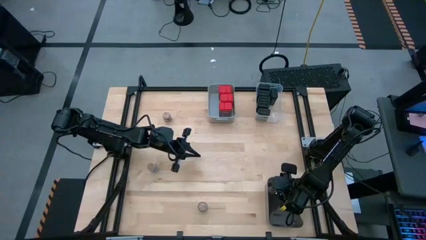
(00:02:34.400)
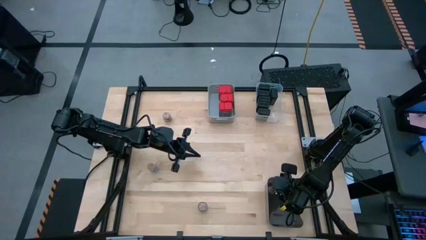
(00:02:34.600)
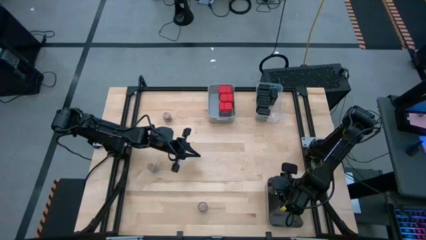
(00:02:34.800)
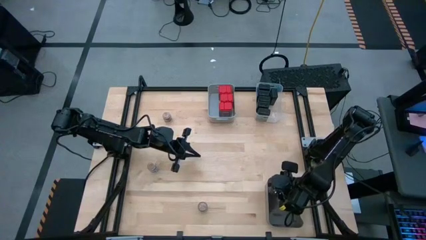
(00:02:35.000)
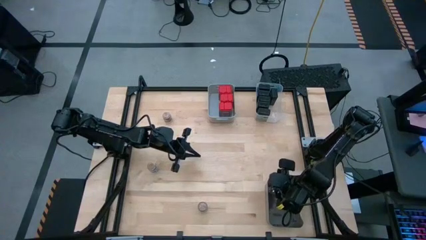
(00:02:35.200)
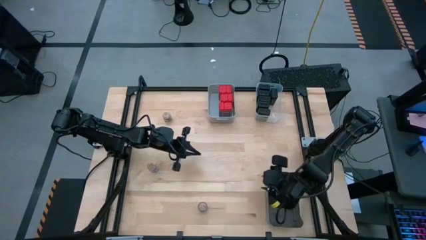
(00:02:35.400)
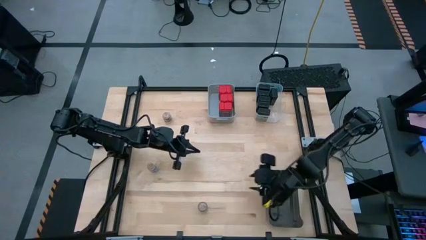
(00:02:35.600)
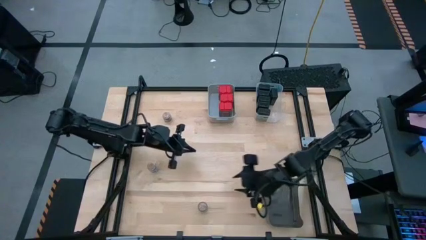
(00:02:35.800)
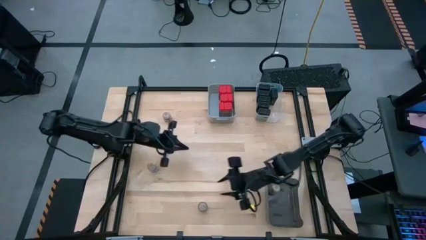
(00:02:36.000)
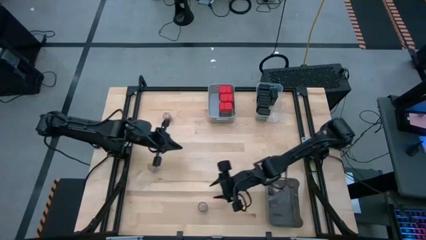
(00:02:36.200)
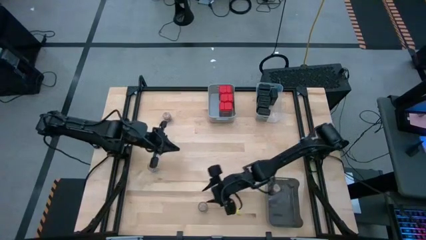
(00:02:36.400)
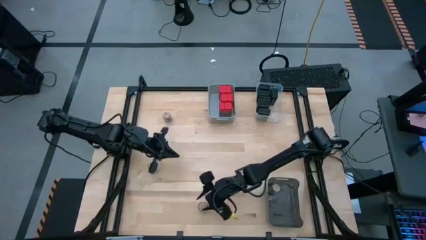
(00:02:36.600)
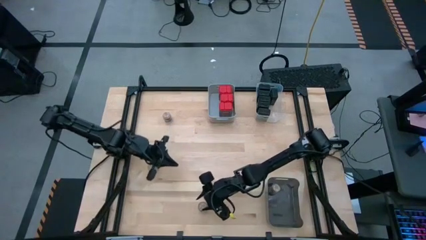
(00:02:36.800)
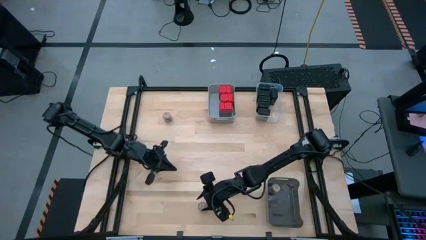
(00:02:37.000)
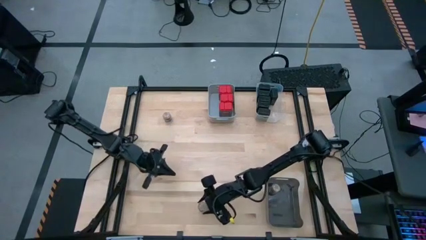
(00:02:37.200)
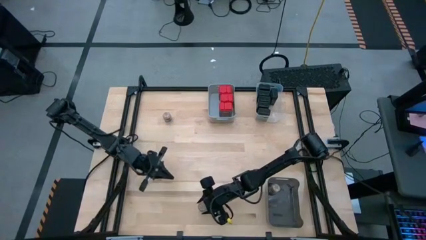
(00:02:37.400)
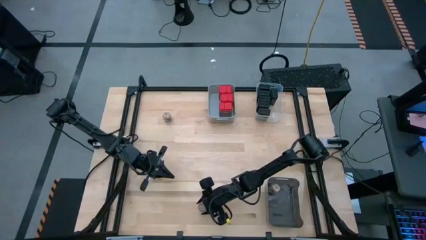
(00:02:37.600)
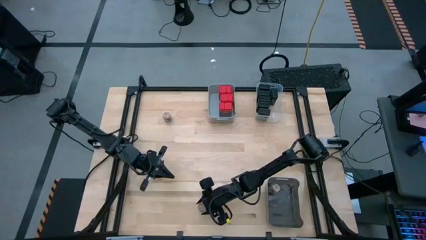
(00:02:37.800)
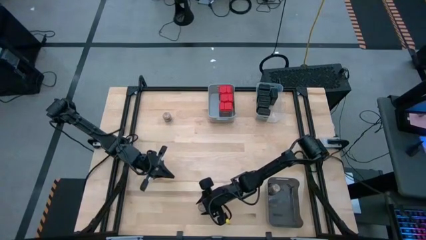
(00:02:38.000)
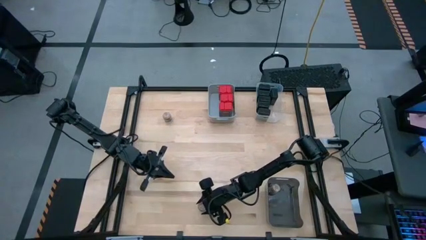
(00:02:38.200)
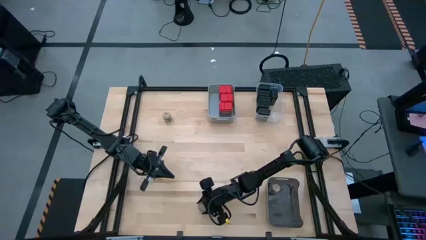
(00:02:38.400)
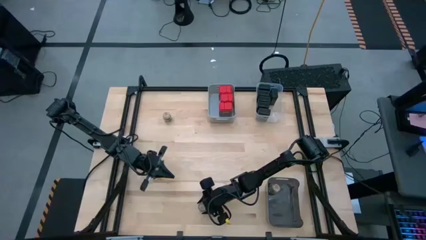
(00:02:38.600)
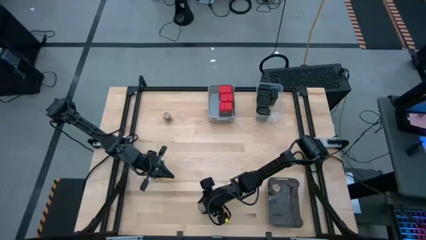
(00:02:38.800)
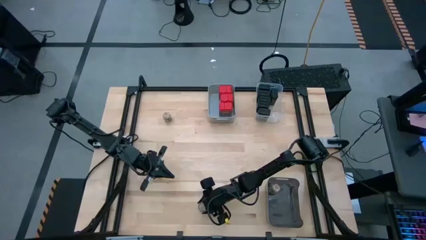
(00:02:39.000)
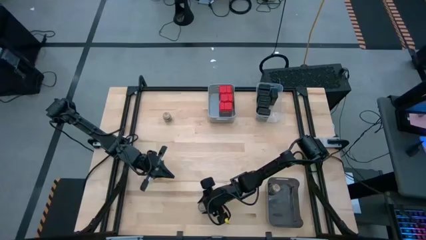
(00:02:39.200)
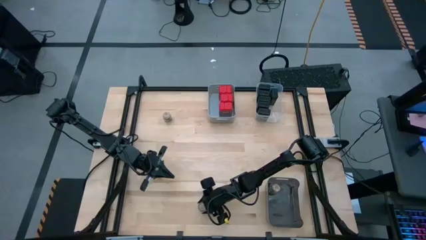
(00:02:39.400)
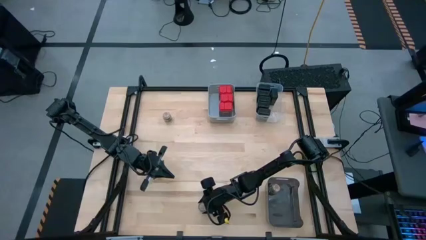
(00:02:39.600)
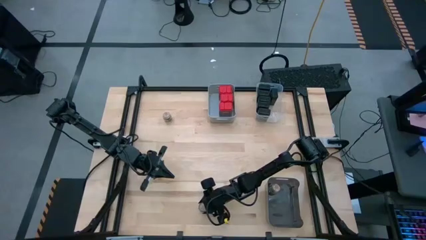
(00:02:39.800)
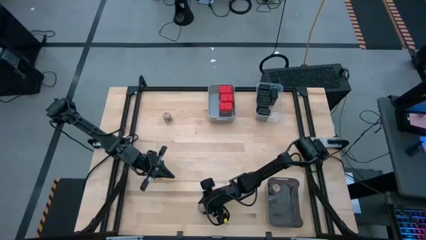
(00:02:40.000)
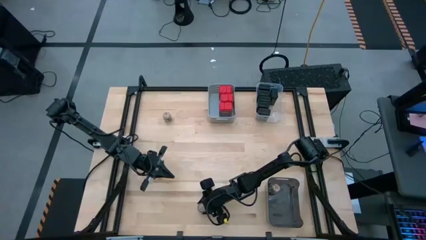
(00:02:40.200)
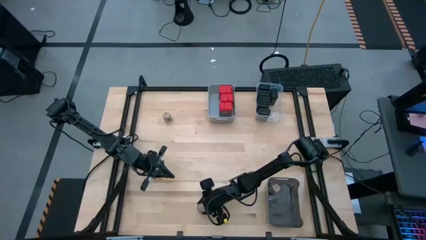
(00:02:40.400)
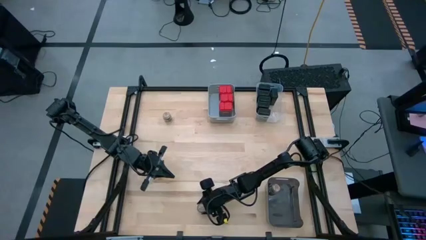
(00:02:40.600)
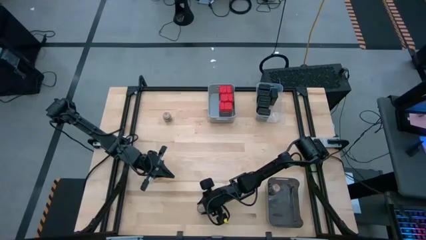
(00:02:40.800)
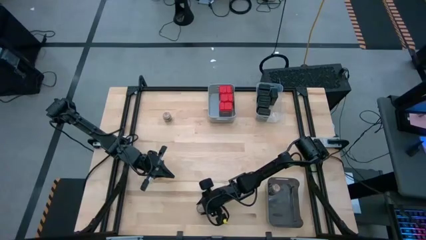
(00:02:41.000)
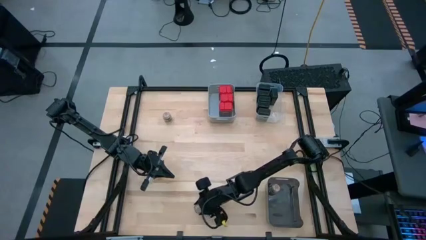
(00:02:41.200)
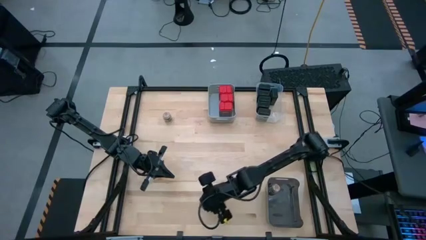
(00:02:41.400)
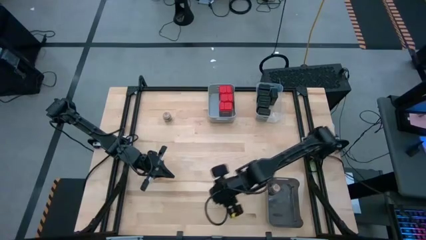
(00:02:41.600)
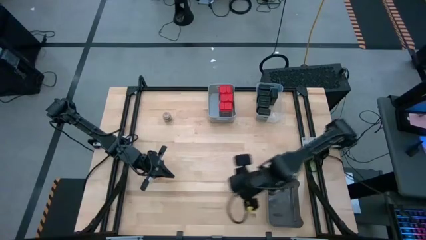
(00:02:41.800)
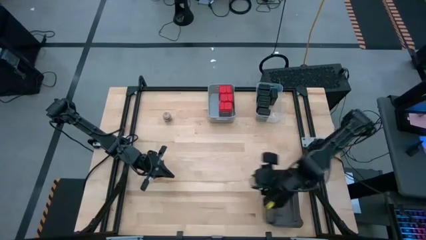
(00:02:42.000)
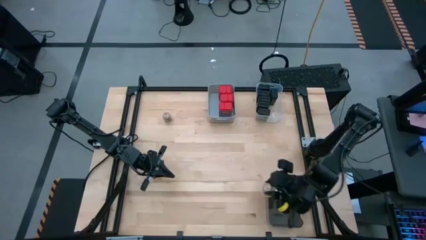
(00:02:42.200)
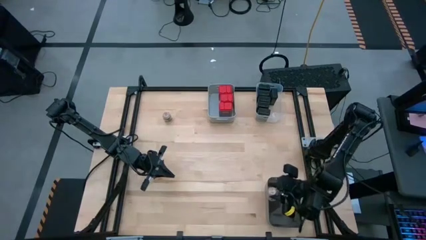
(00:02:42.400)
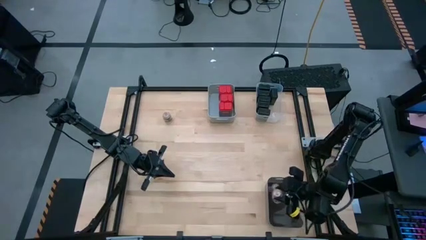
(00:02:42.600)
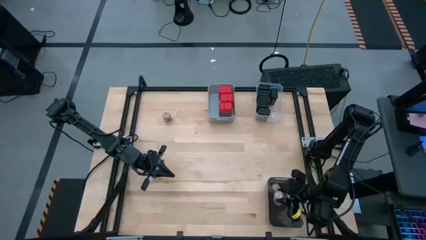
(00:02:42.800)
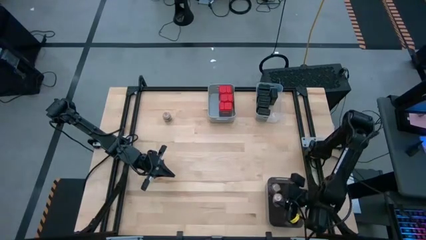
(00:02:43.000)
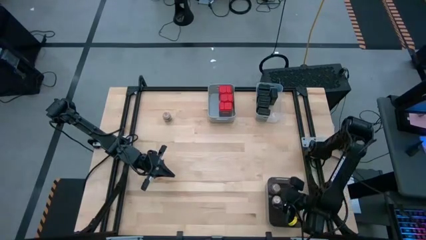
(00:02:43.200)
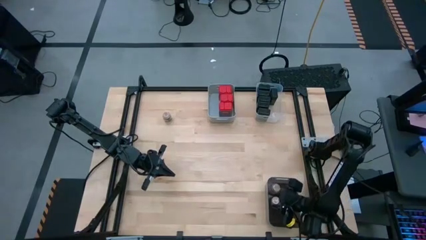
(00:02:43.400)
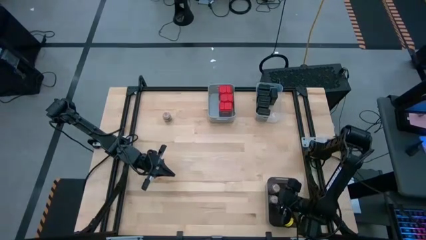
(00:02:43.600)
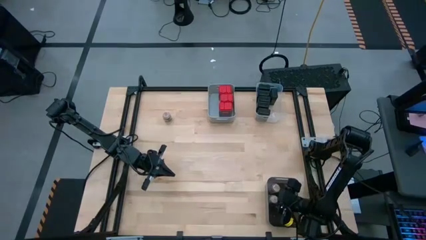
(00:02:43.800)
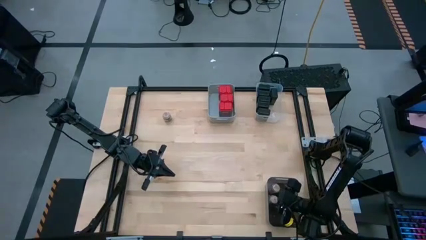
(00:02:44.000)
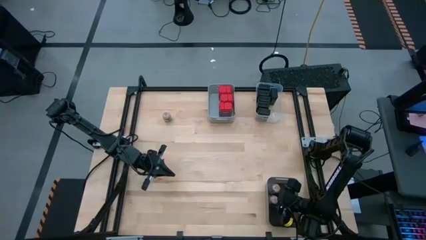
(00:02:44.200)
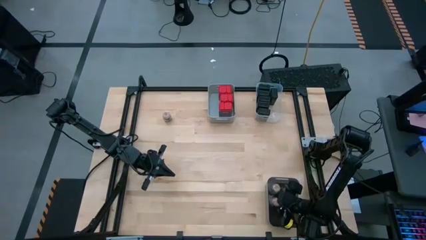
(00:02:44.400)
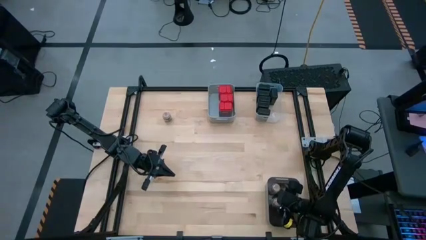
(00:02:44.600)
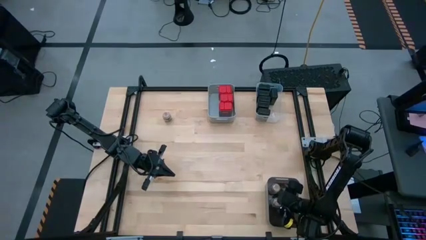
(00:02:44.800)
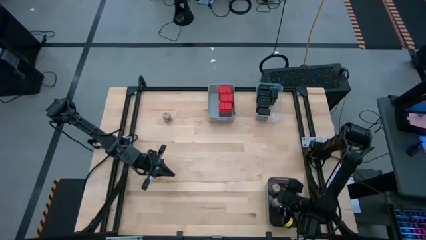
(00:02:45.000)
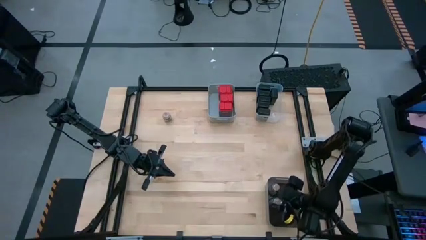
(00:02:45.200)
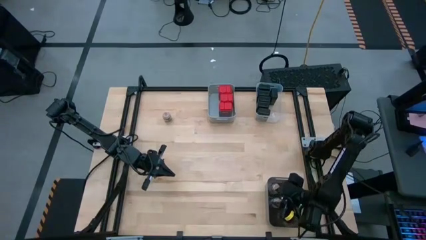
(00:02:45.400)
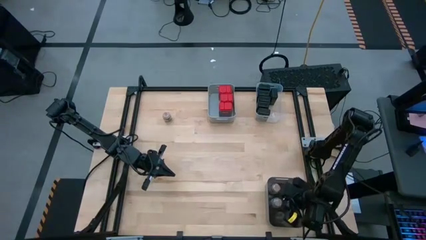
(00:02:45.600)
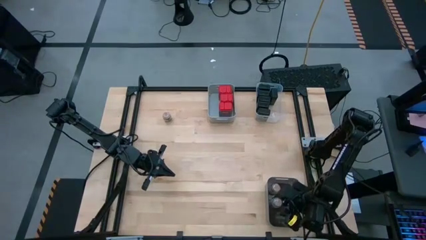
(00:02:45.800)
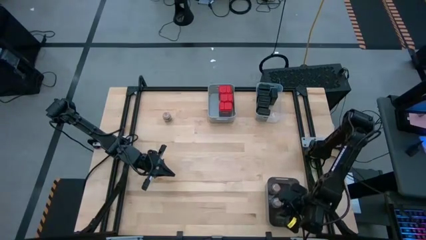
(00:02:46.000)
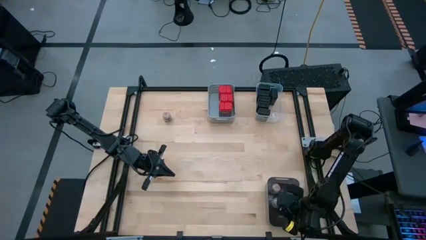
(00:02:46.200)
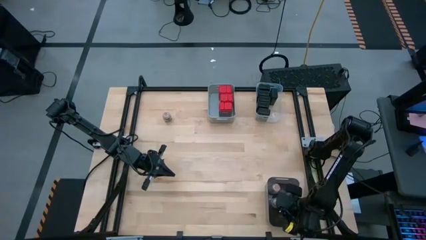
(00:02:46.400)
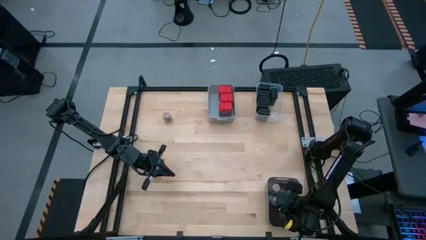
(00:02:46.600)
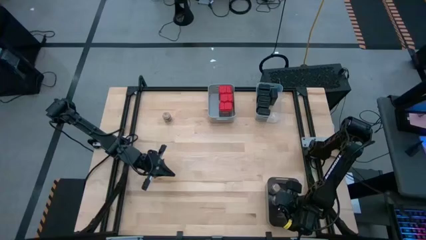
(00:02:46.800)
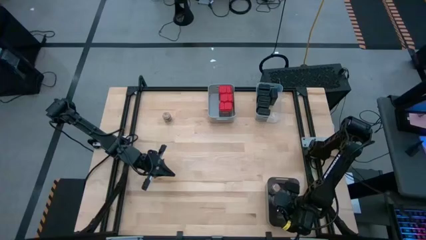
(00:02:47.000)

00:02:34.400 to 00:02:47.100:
Task: Sort spices by type
Put the brown seasoning bottle into the black bin

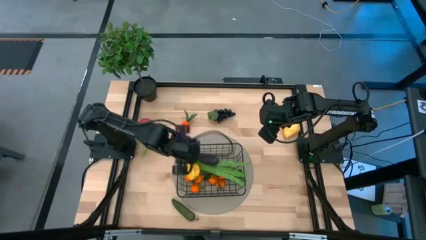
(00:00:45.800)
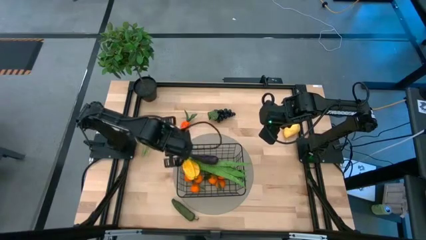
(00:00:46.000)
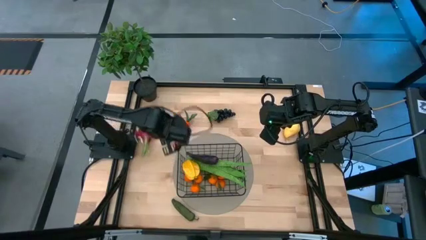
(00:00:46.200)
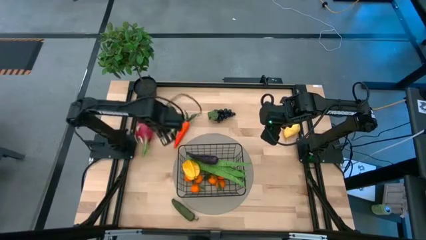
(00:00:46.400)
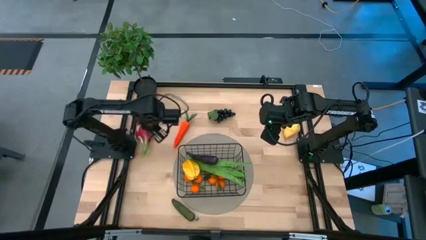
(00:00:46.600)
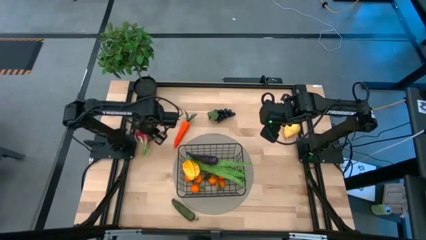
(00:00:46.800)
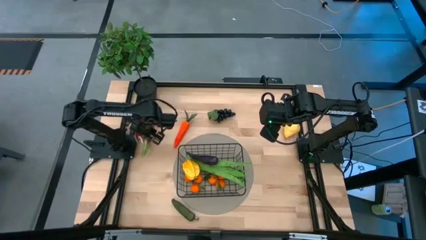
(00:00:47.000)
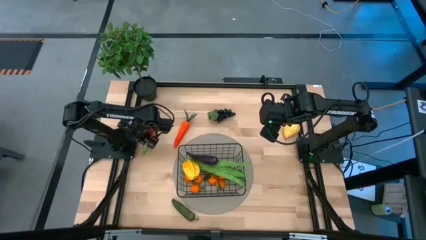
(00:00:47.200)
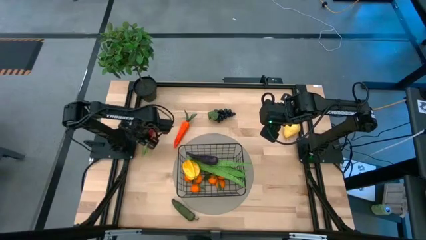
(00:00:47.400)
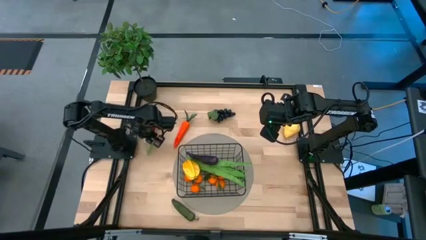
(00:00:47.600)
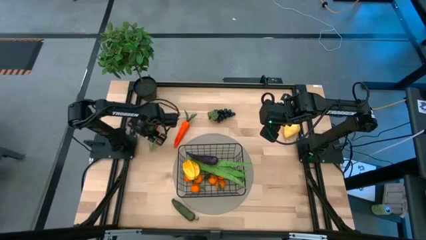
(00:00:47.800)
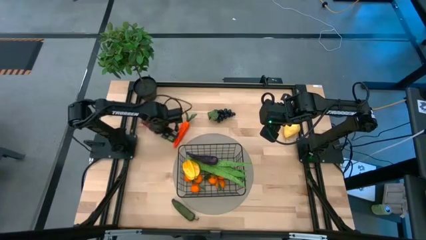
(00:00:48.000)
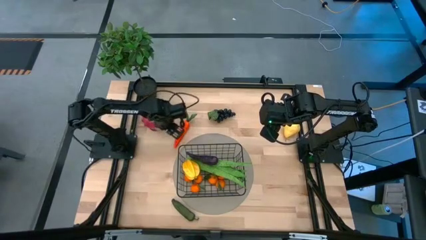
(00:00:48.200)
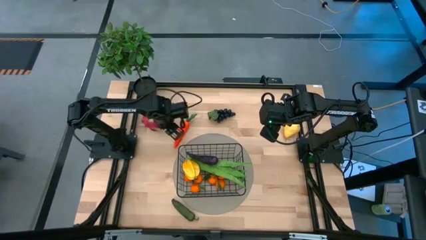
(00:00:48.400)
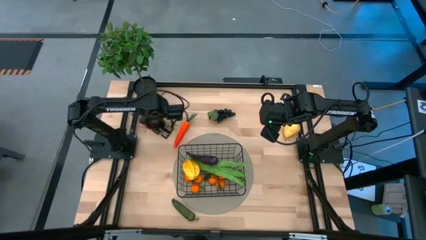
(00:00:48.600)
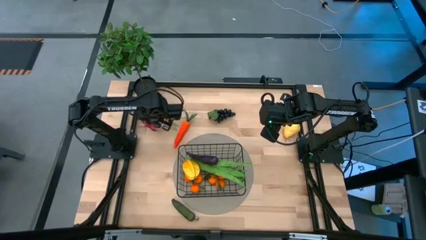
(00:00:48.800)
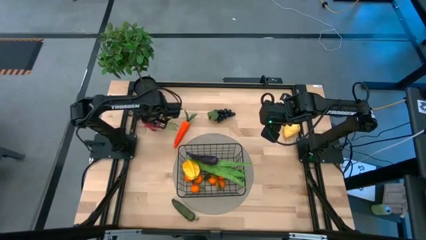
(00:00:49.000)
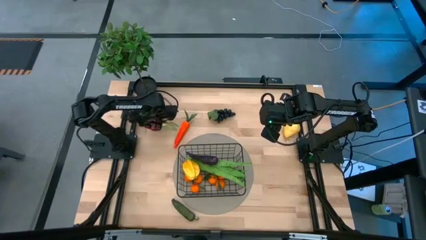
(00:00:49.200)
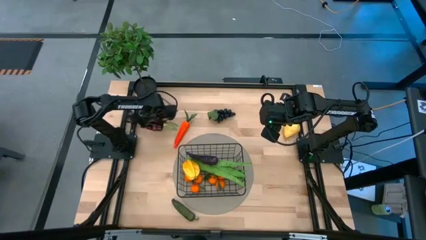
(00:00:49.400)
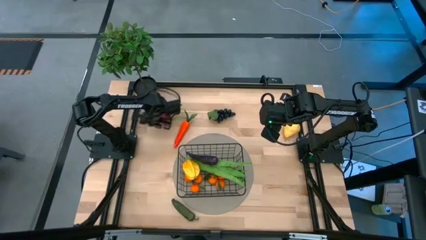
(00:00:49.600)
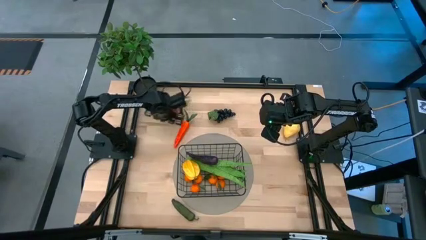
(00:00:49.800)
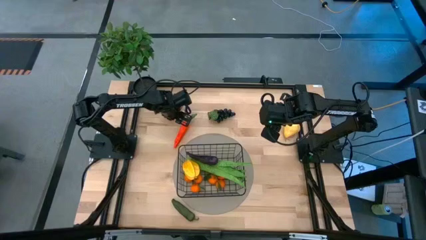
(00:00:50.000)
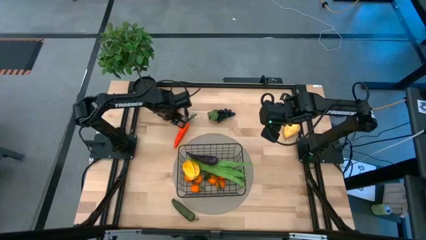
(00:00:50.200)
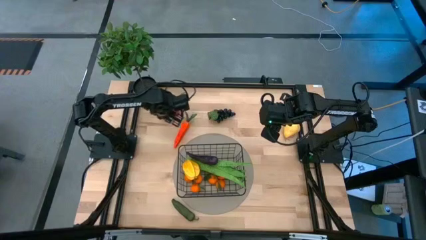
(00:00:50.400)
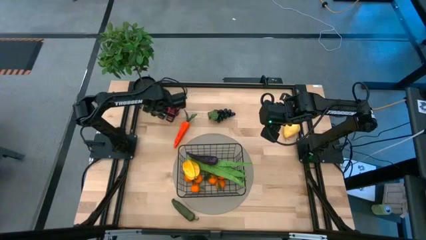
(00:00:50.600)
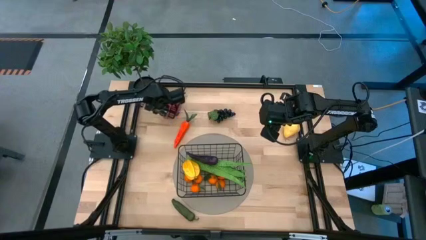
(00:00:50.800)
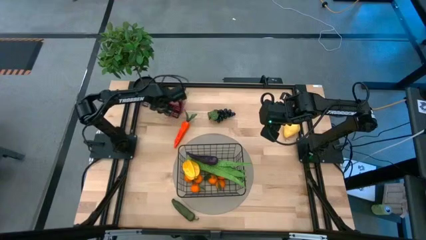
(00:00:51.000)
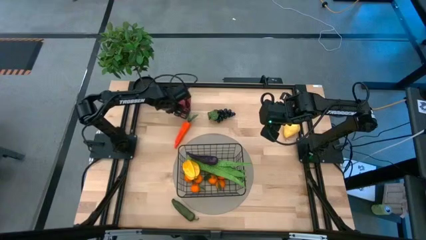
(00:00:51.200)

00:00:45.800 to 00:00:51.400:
Task: Build produce basket
Adjust the dragonfruit
